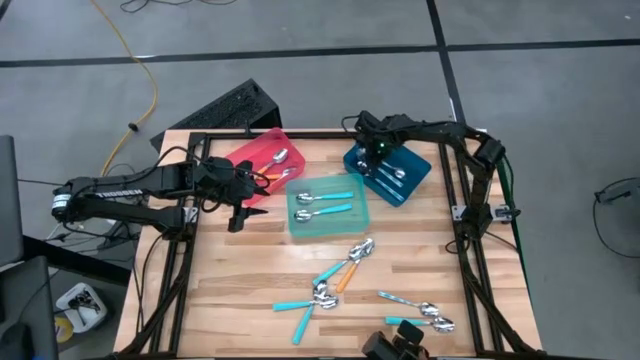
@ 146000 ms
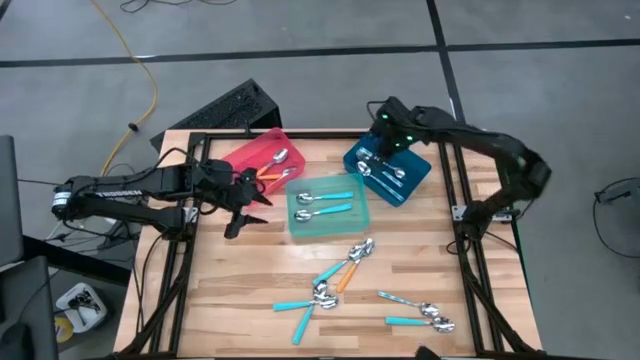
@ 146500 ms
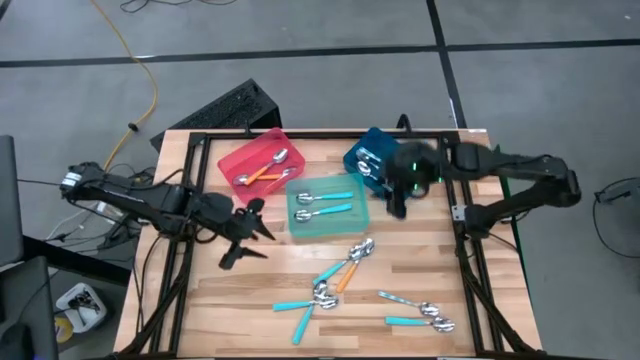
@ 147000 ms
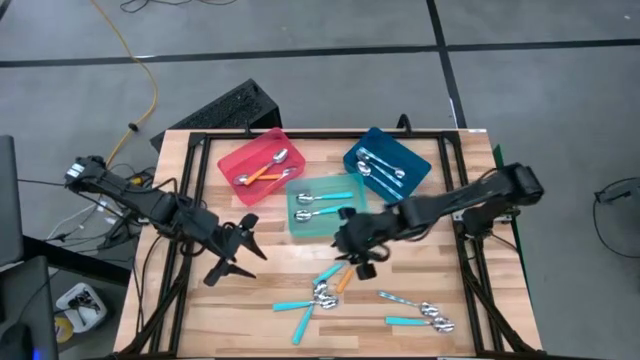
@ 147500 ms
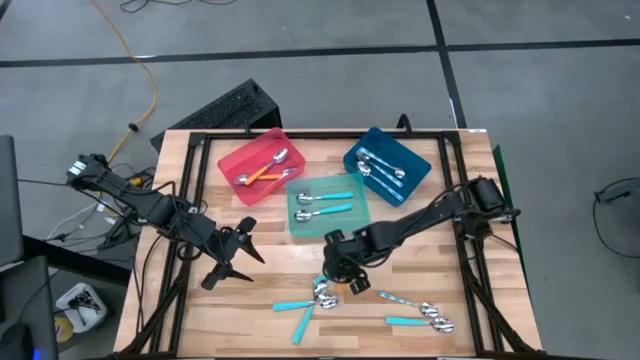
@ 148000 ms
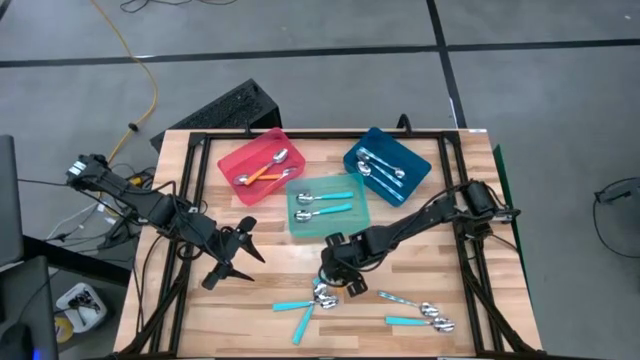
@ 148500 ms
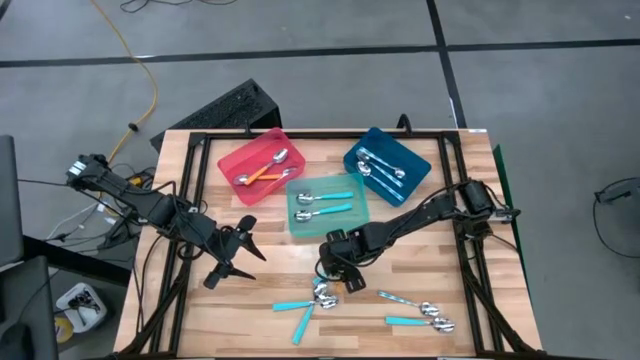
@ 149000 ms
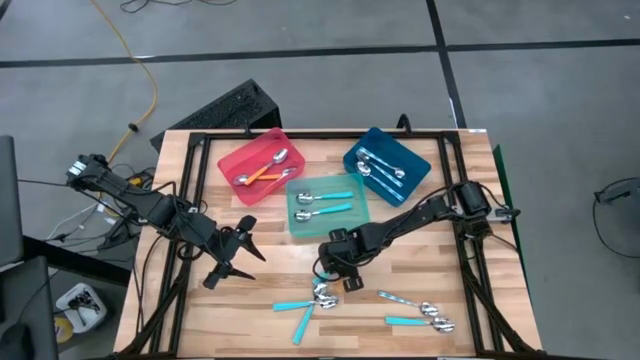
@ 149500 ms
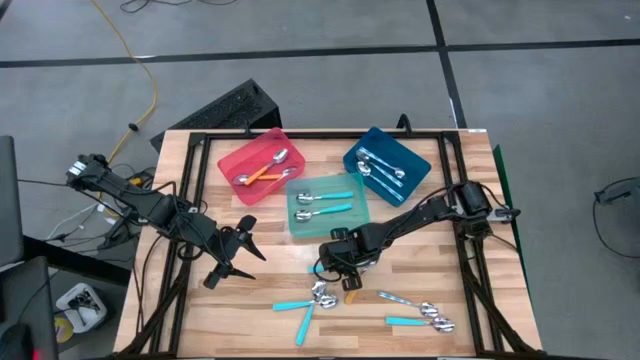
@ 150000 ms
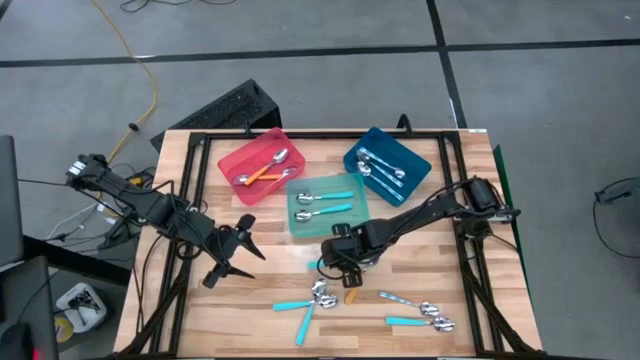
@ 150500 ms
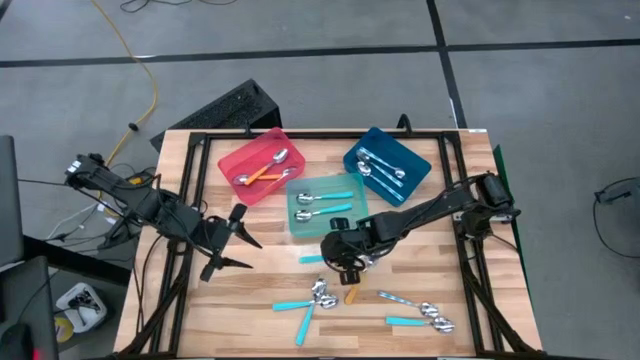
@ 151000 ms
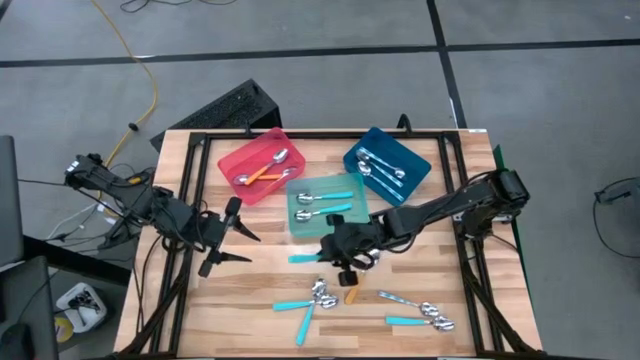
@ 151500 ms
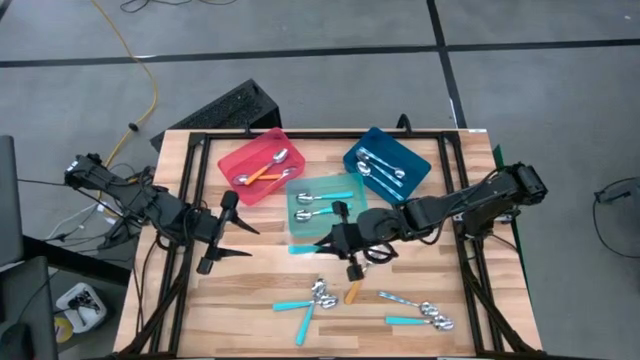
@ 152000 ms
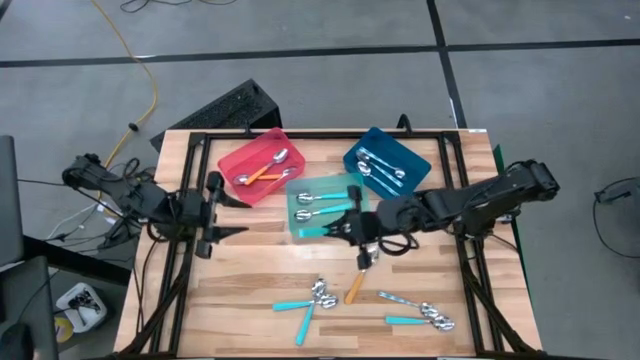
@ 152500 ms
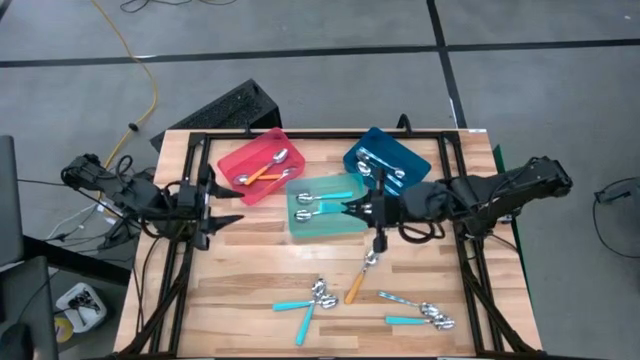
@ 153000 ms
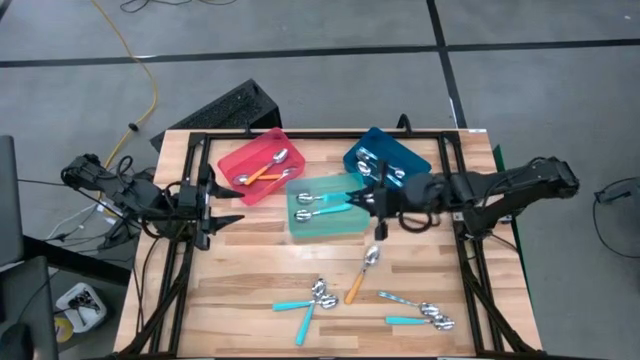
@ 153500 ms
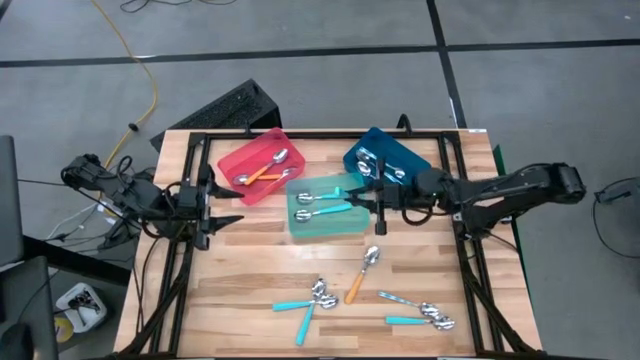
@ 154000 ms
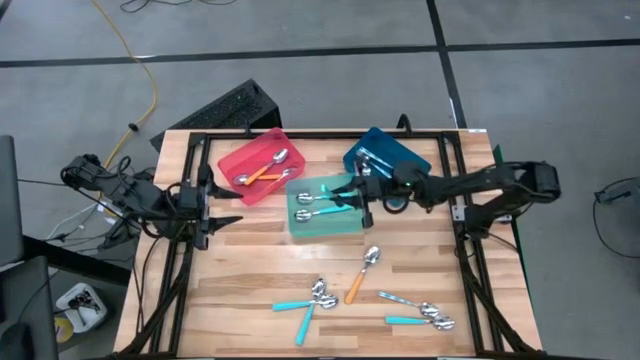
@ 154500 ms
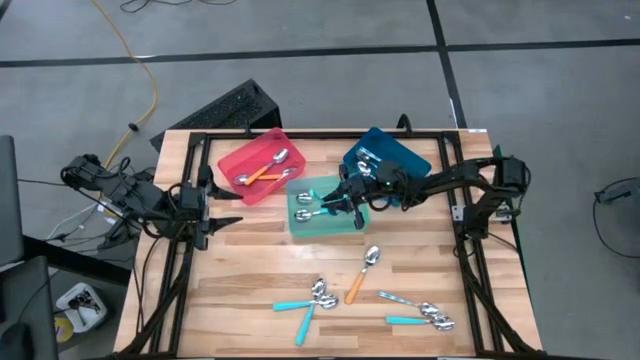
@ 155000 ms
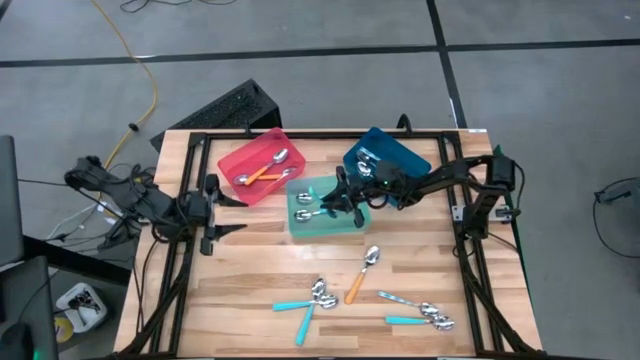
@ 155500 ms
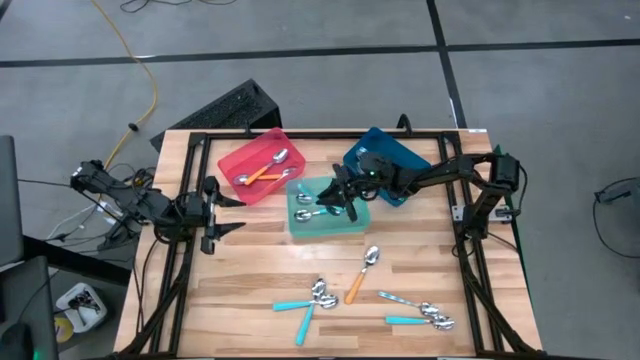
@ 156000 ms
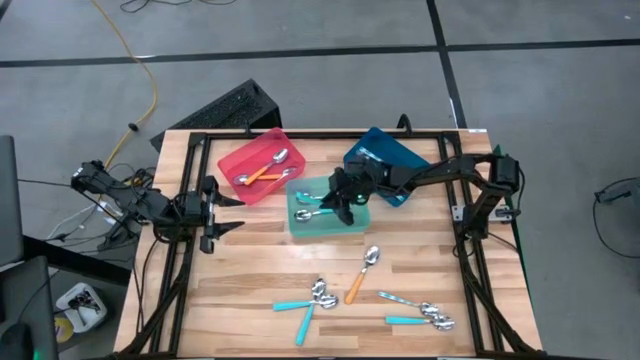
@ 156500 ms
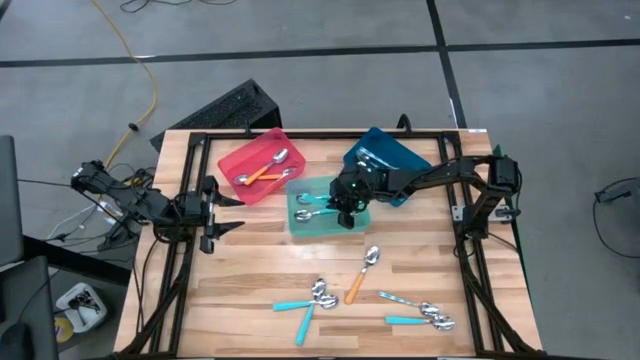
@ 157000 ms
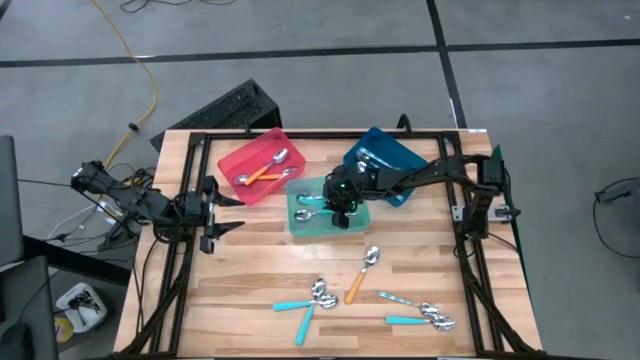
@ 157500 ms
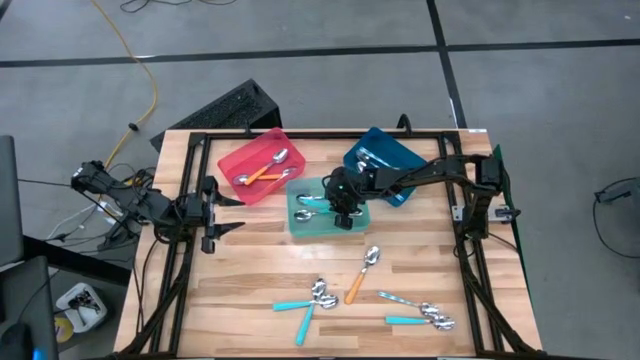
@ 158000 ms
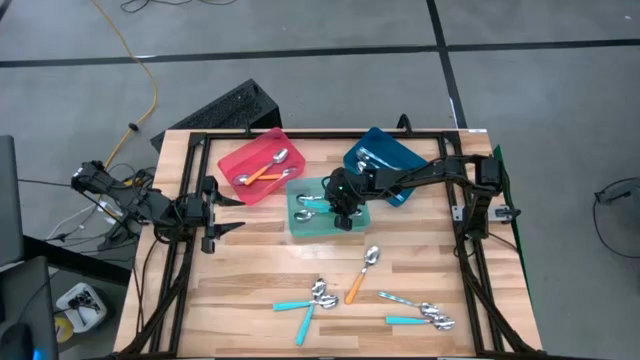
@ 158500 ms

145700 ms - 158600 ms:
Task: Sort silverware by color (type)
Put the blue spoon into the green bin

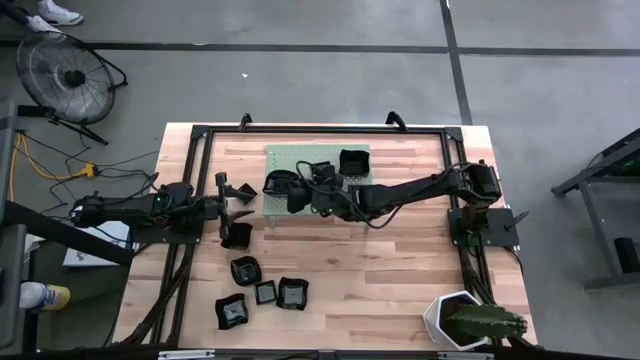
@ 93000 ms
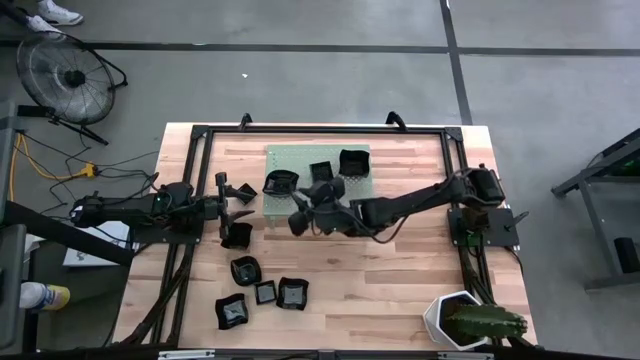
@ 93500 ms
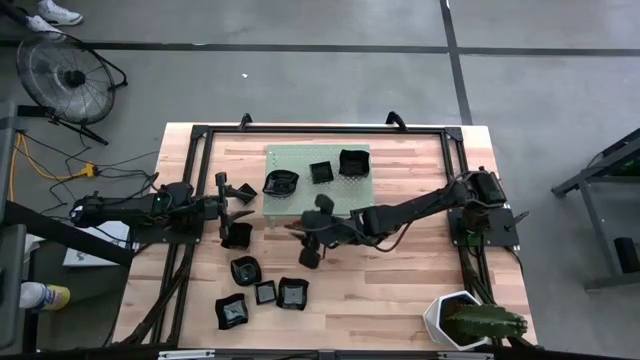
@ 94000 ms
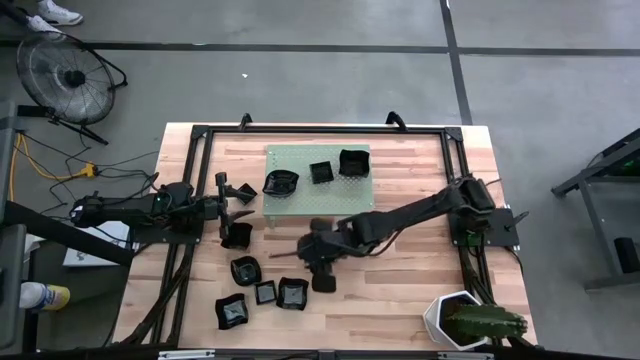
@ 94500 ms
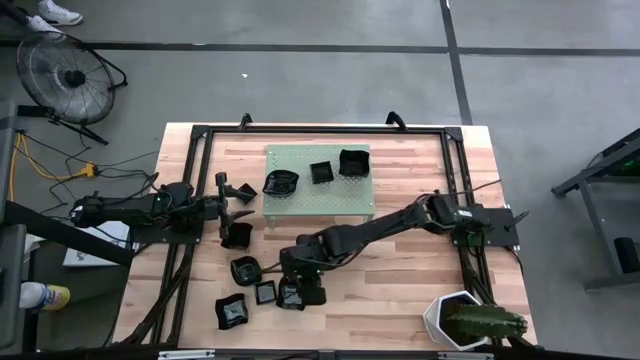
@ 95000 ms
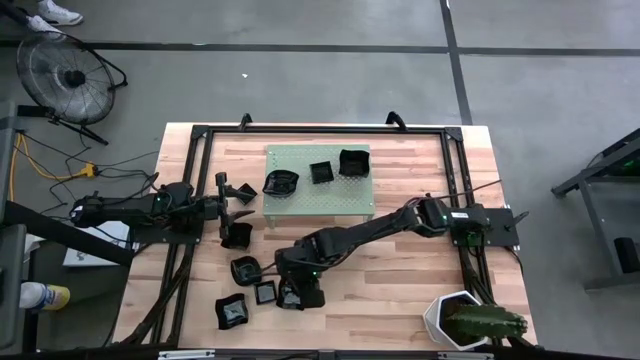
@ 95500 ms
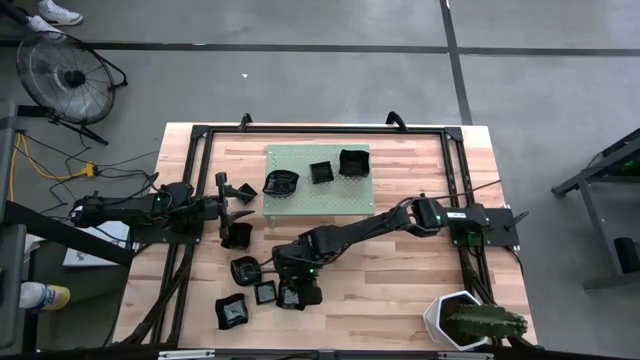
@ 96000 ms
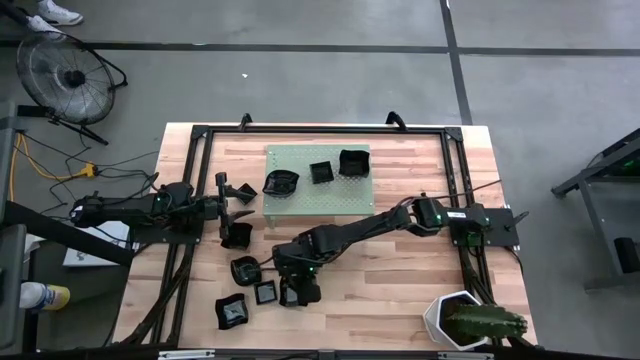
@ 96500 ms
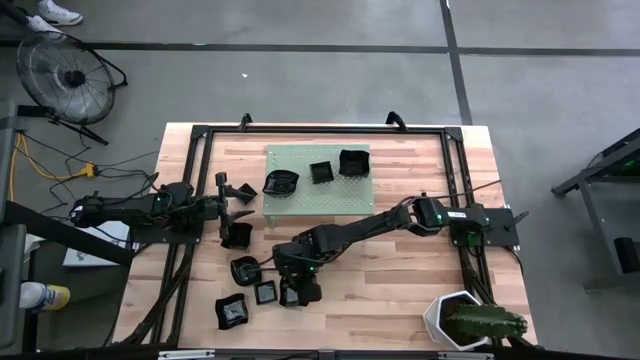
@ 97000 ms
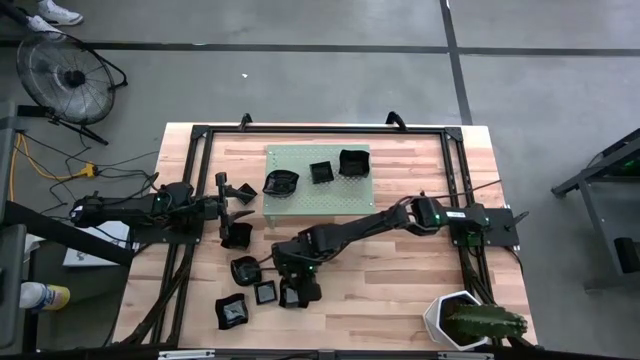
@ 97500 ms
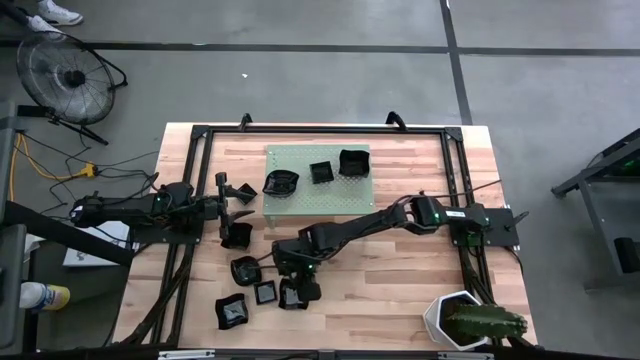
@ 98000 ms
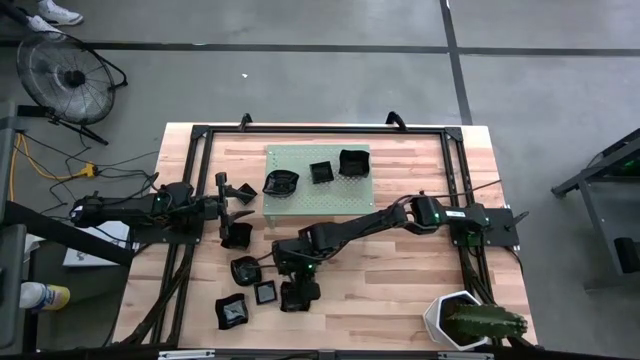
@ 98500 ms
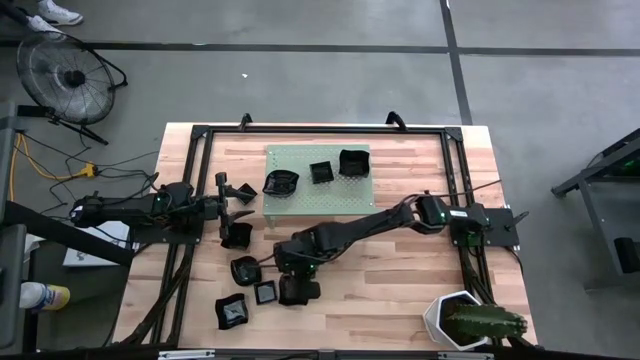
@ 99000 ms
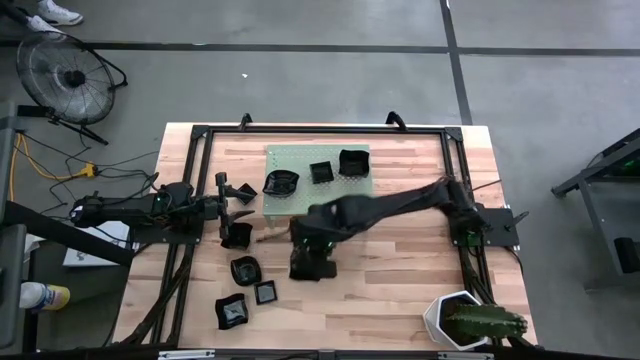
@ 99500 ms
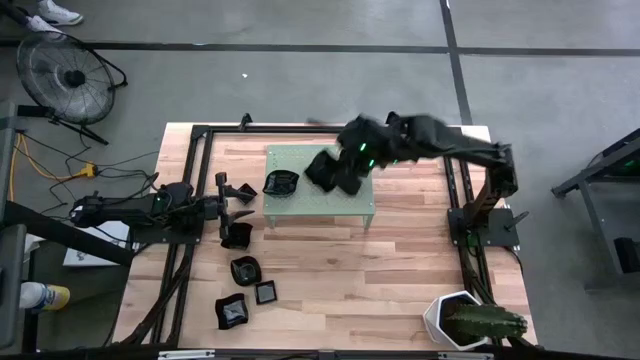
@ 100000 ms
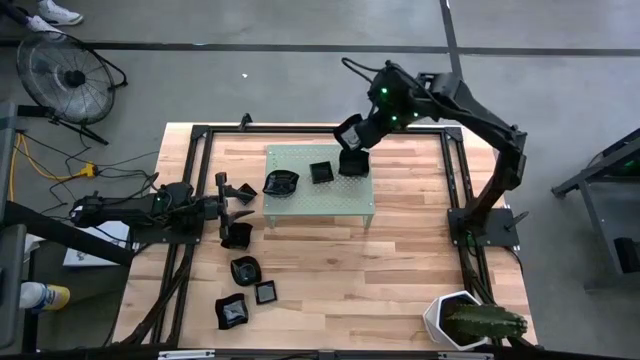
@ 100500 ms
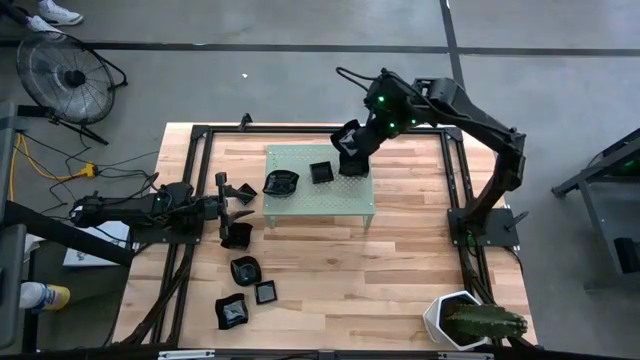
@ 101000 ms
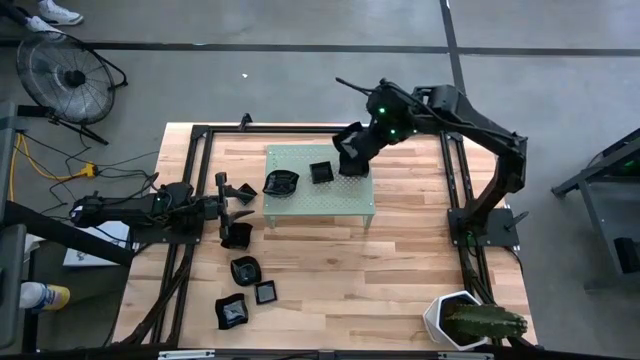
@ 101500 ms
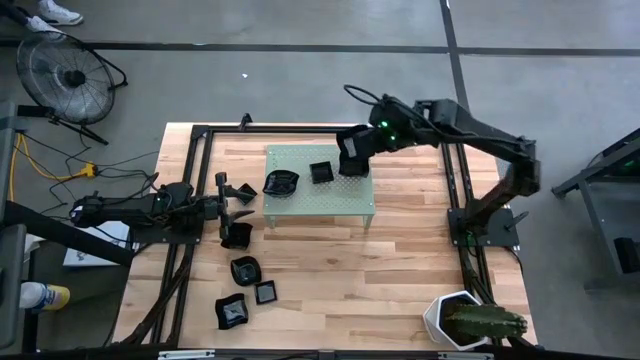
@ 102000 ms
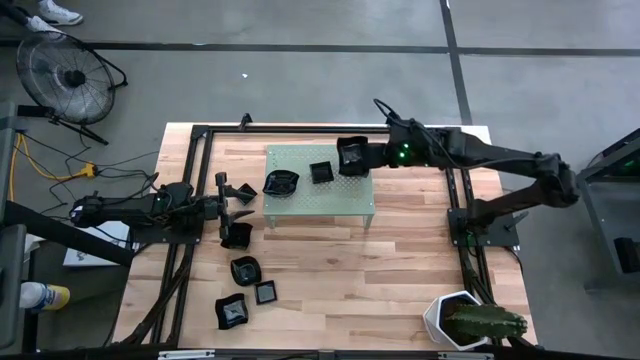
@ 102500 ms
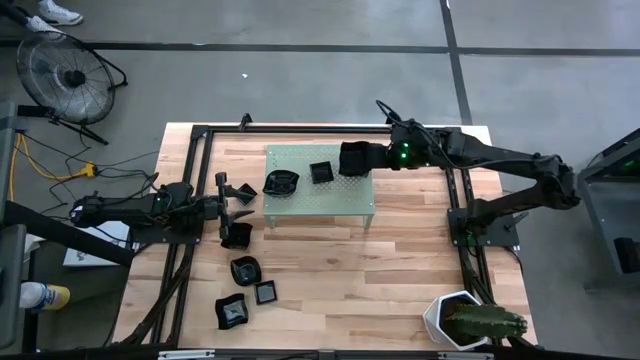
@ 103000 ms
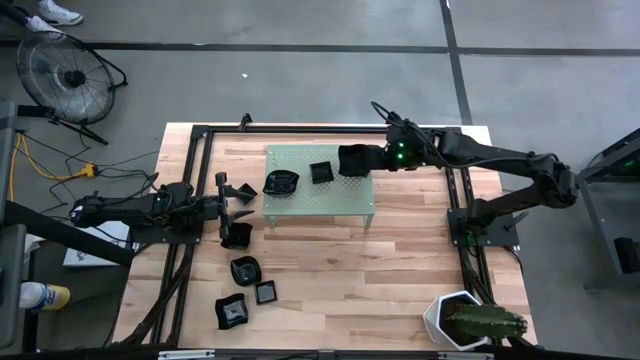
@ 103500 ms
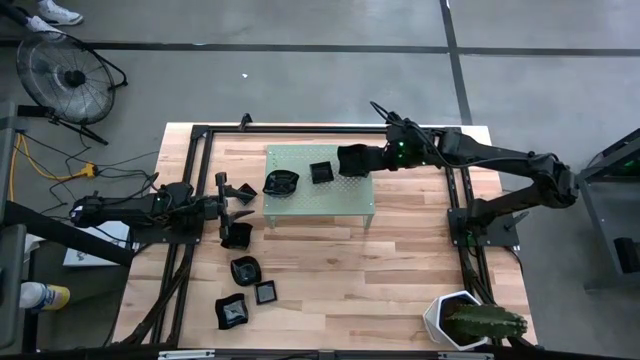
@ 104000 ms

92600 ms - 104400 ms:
Task: Pick & Place Mini shaped plates
Stack the distorted square plate on top of the other distorted square plates on the shelf
